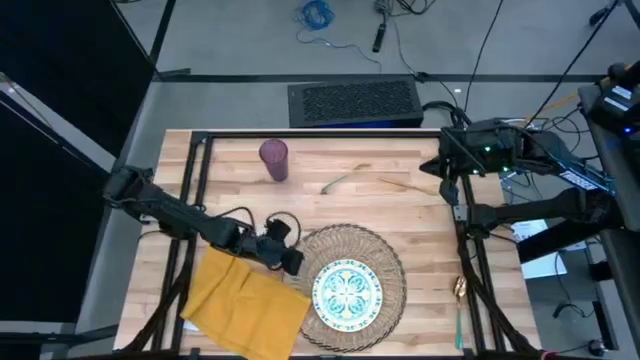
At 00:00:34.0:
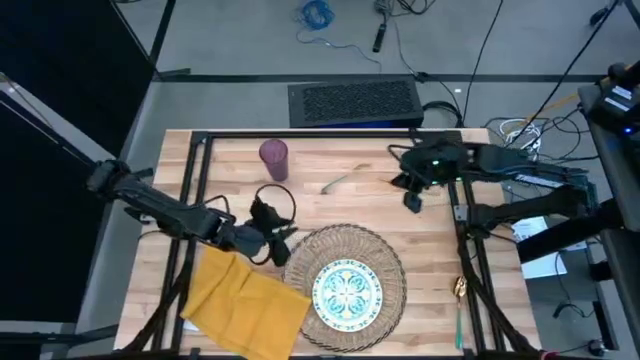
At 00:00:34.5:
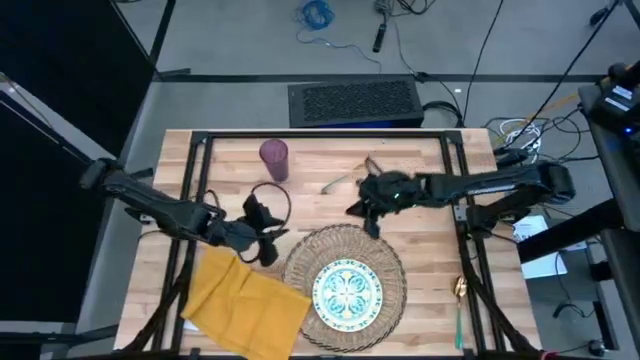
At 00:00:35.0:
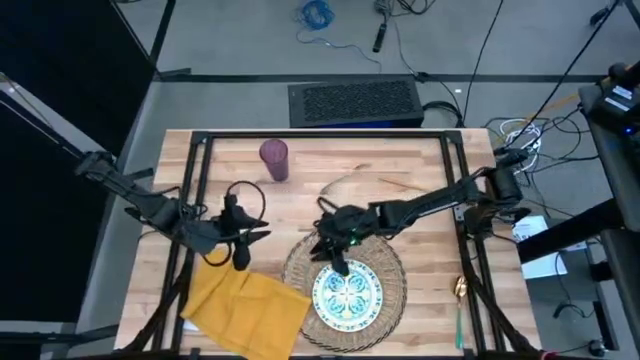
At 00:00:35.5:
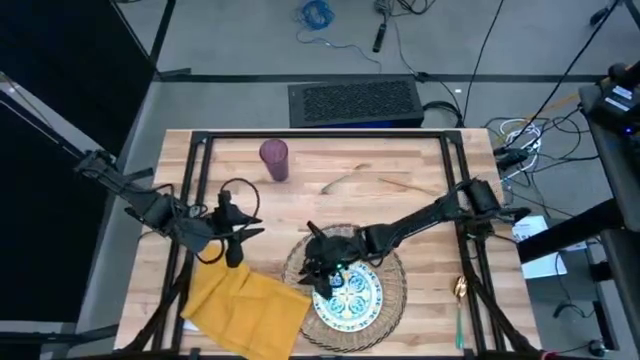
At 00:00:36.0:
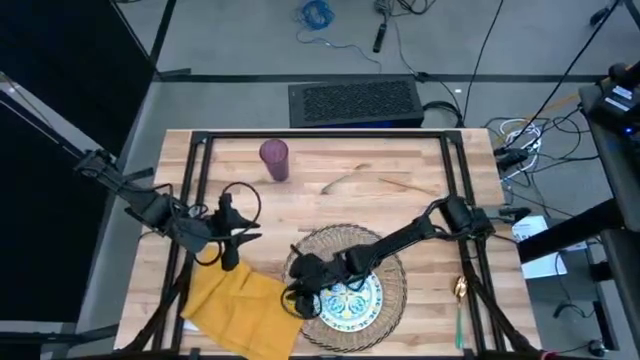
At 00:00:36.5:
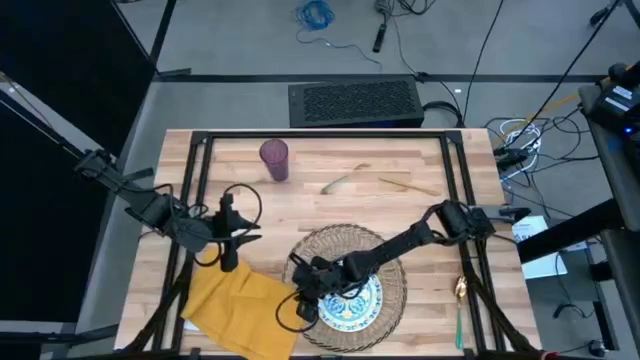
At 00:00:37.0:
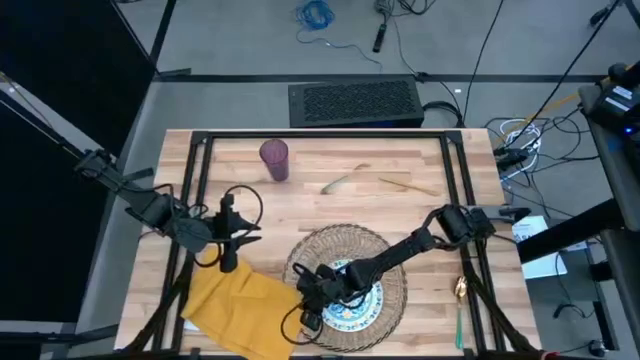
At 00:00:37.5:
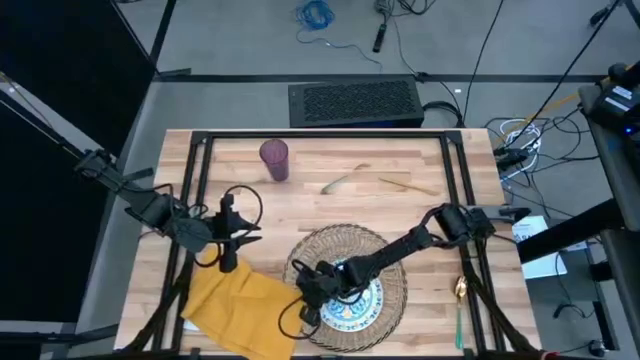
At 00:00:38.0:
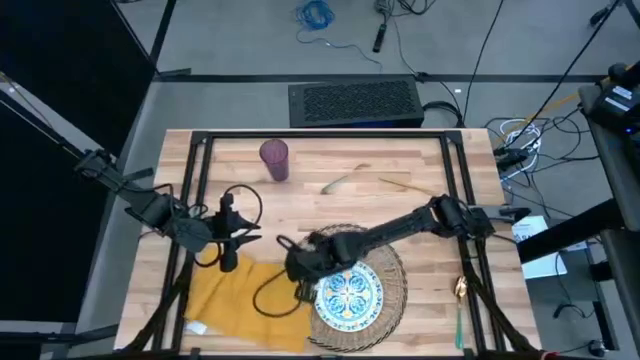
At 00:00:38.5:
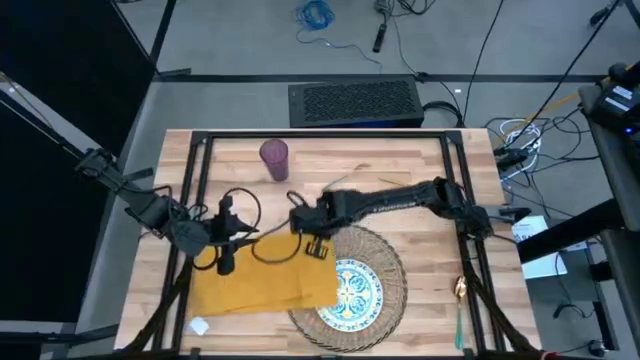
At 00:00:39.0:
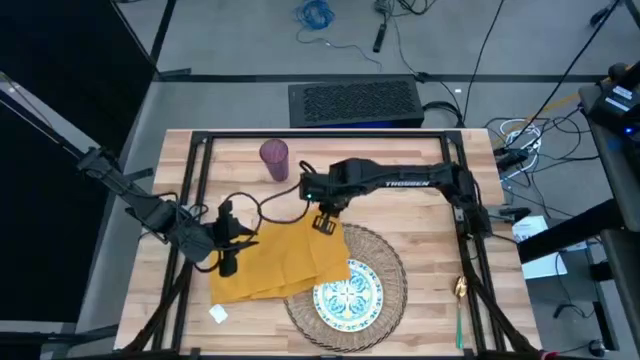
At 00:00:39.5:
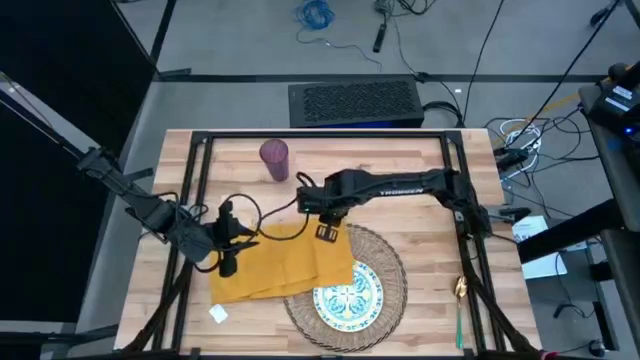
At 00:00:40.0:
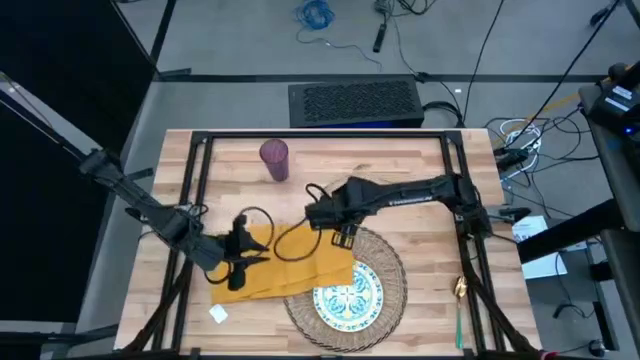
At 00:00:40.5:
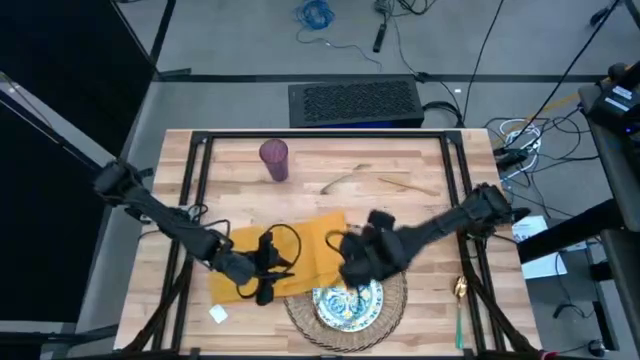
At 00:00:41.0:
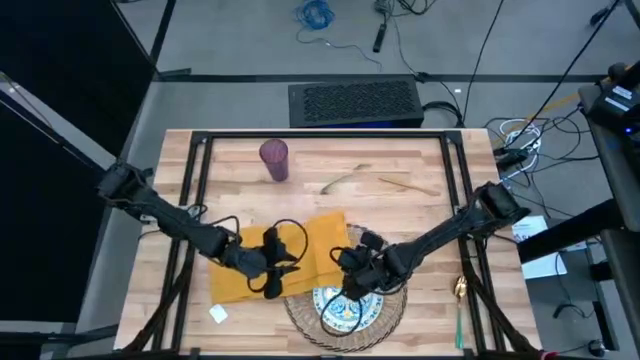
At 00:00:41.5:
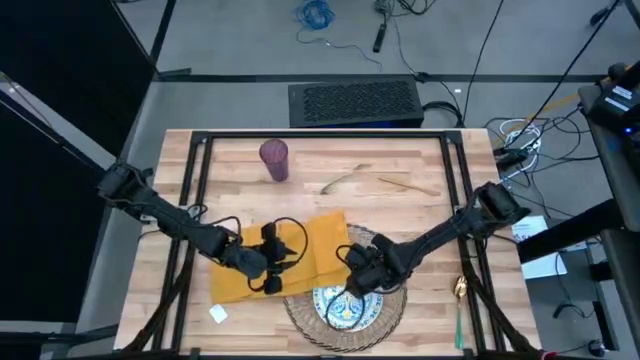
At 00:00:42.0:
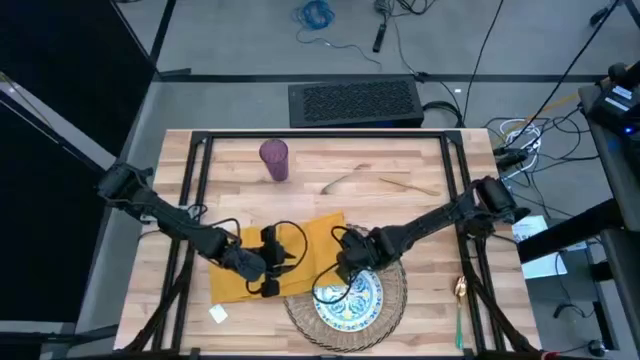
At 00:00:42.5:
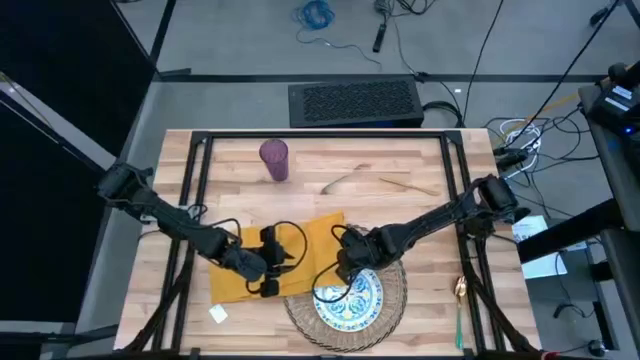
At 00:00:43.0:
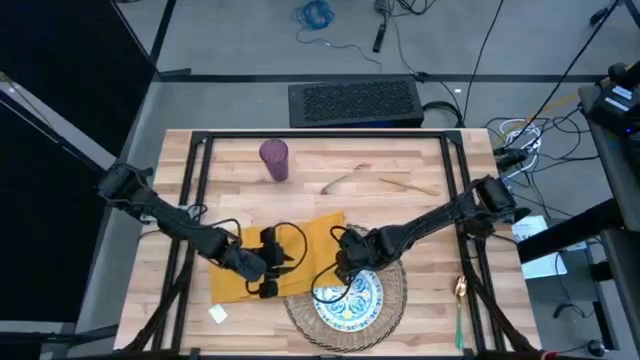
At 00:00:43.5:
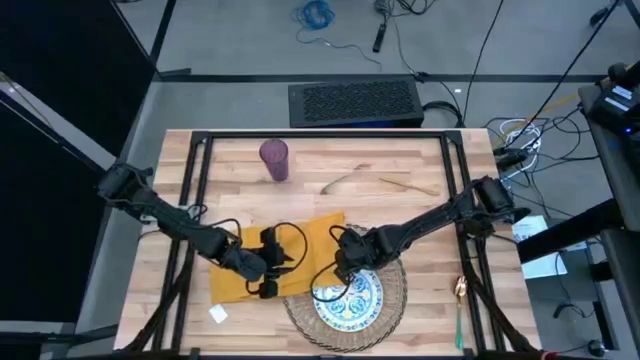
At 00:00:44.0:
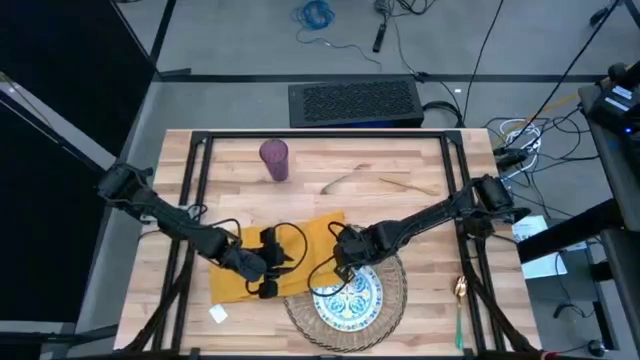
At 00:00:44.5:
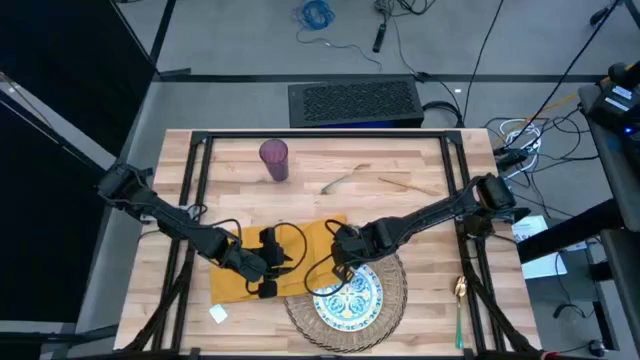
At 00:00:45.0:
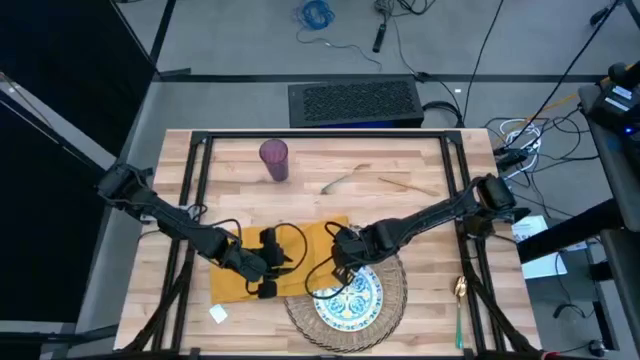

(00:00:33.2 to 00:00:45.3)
Task: Set table place
Fold the yellow table napkin

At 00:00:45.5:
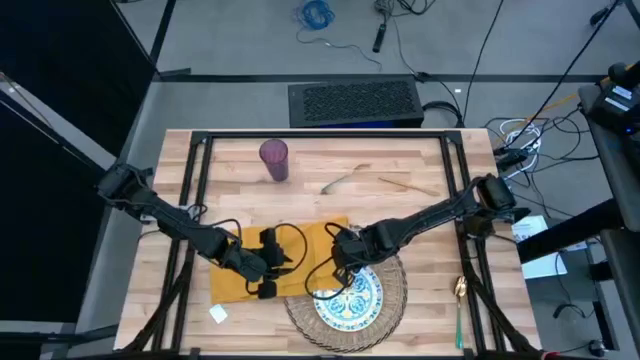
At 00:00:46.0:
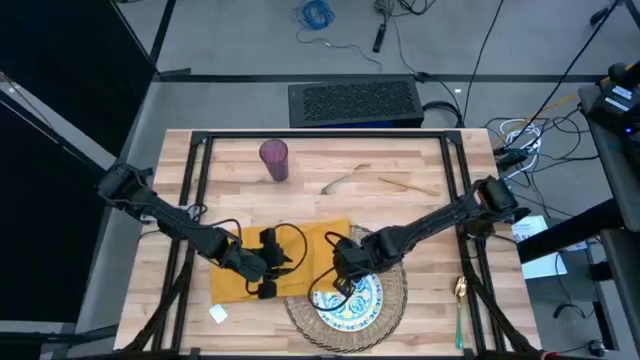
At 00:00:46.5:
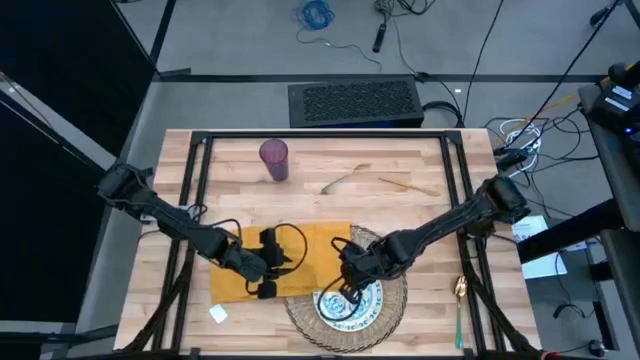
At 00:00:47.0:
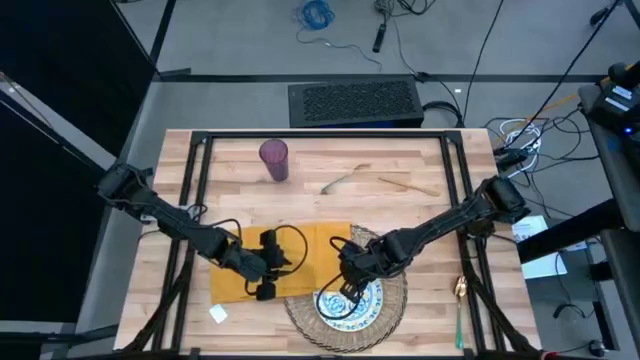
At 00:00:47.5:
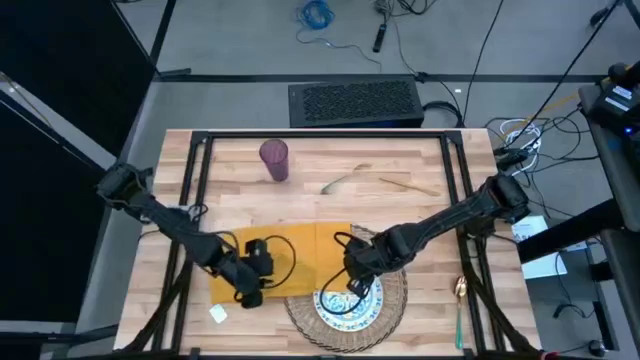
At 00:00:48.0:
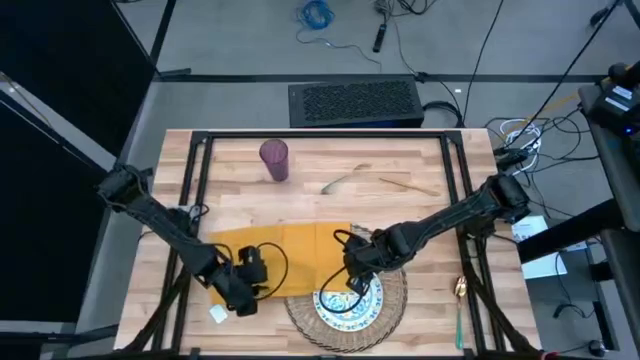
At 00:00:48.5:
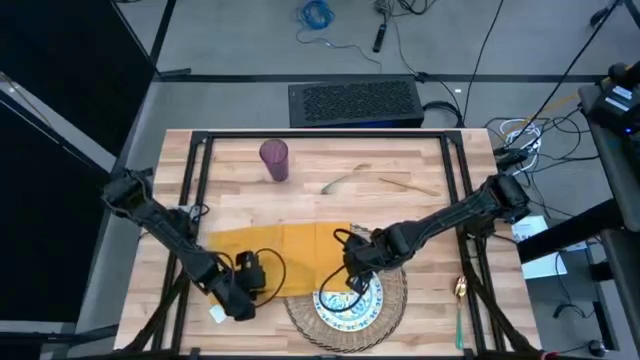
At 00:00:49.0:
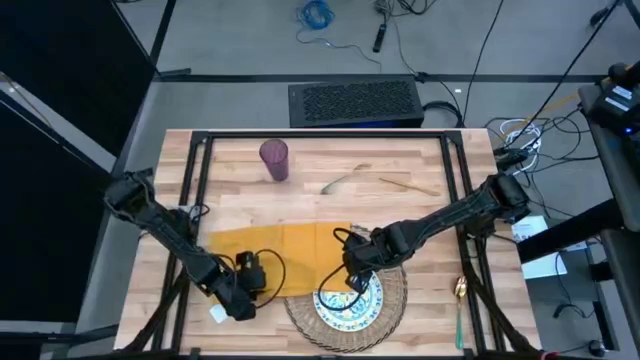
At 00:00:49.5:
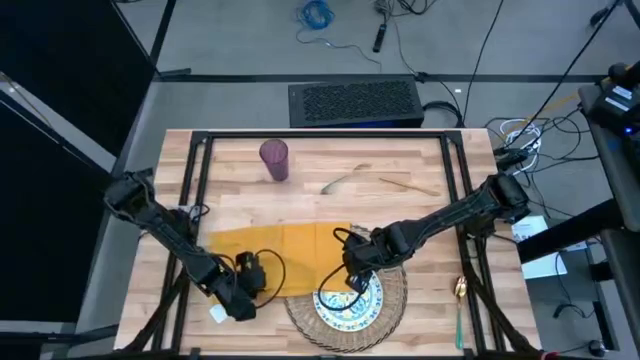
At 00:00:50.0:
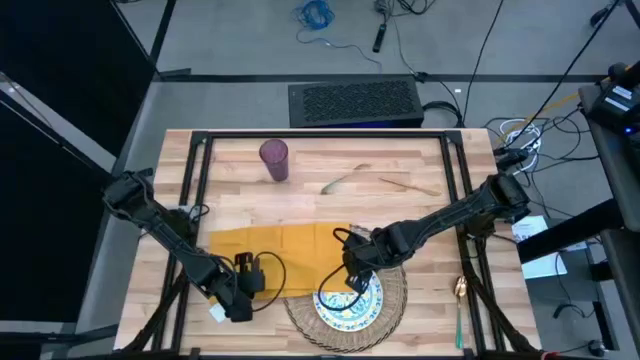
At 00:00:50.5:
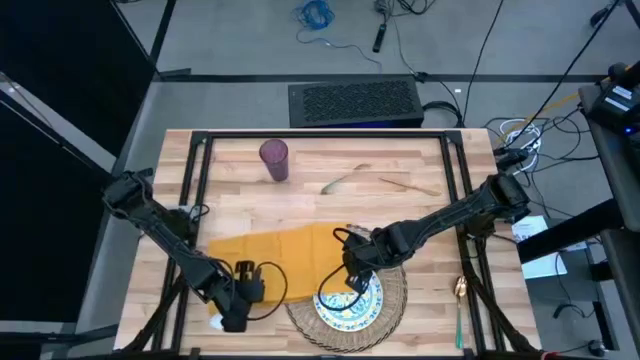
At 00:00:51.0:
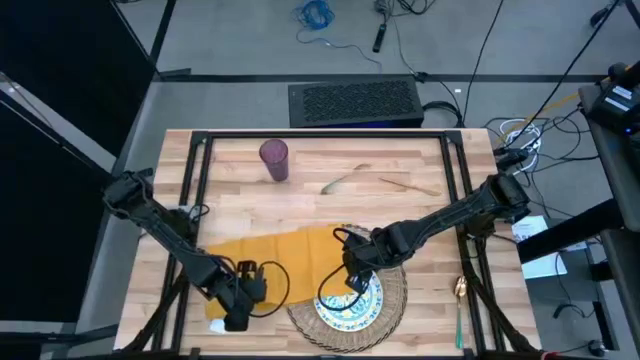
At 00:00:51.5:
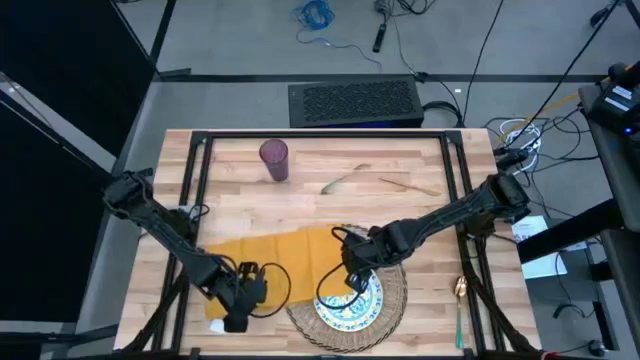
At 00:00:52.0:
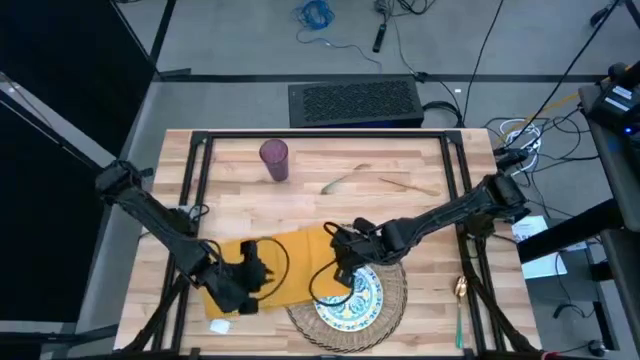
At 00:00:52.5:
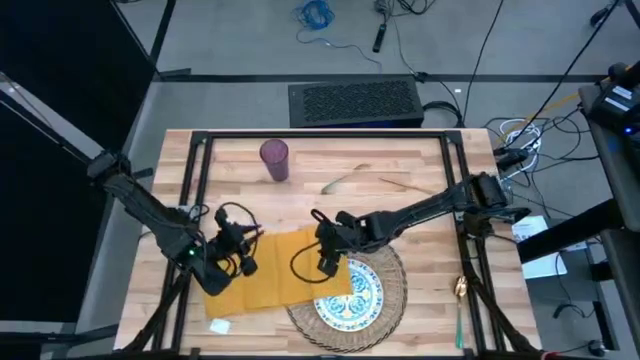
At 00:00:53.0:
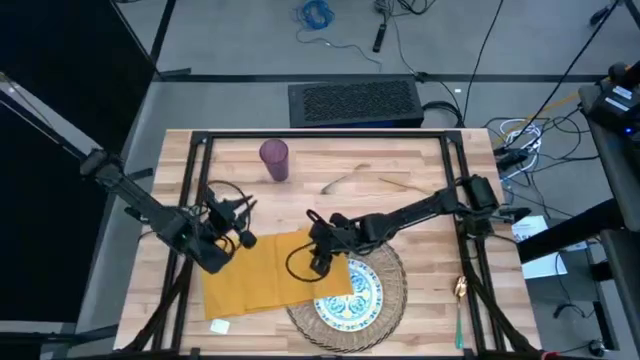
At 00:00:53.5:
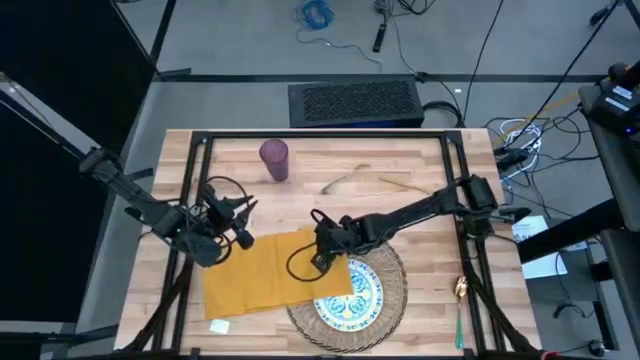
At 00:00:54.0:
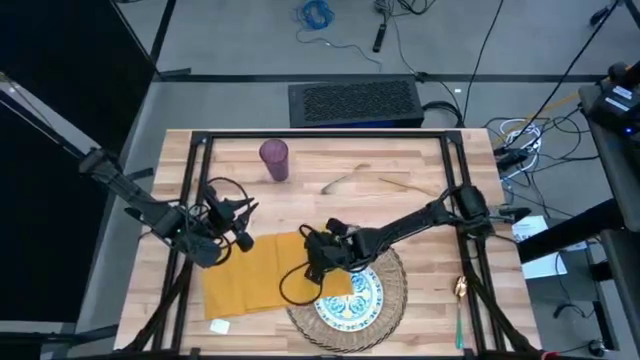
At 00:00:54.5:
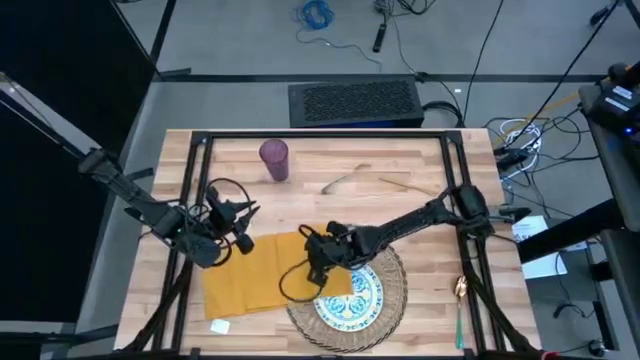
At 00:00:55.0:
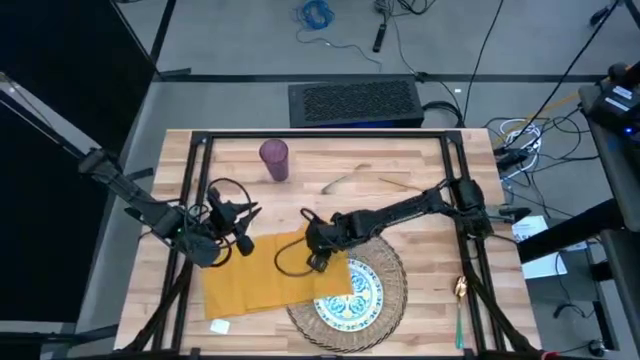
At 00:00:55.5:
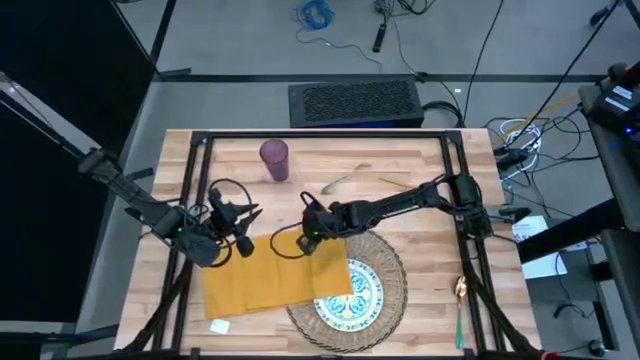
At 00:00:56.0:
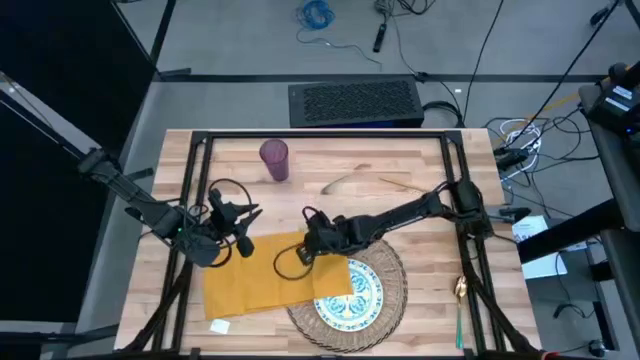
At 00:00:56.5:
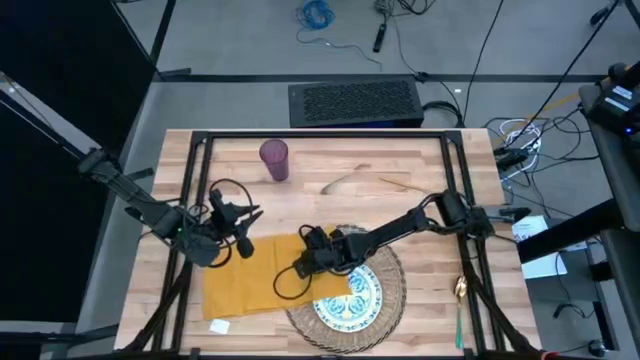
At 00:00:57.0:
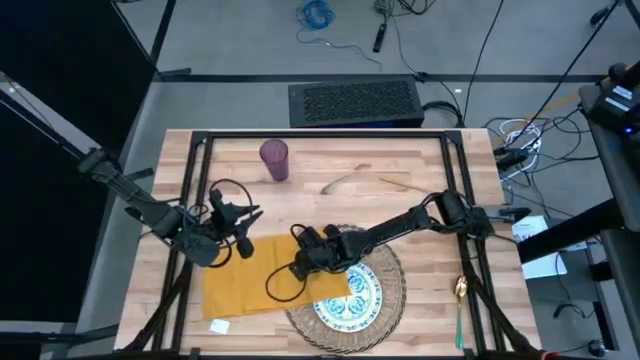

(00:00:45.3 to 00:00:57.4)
Fold the yellow table napkin
